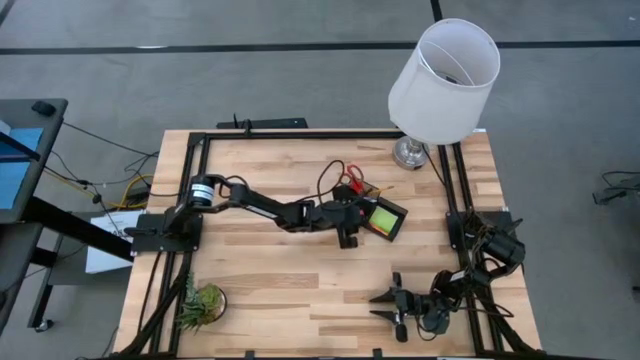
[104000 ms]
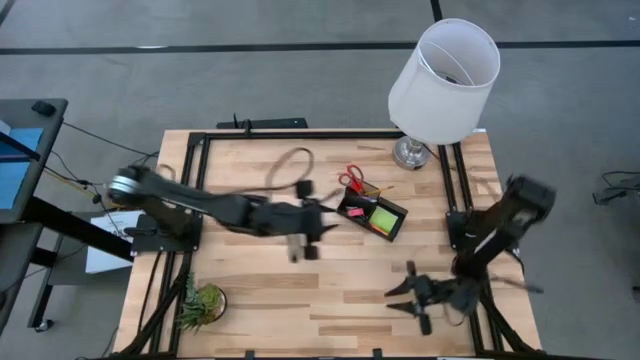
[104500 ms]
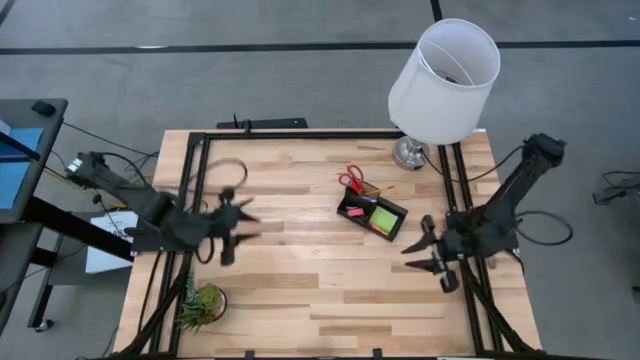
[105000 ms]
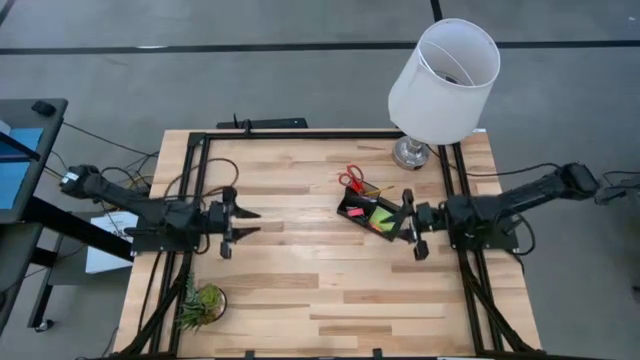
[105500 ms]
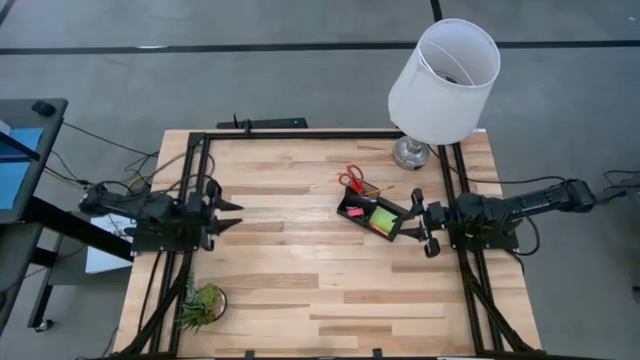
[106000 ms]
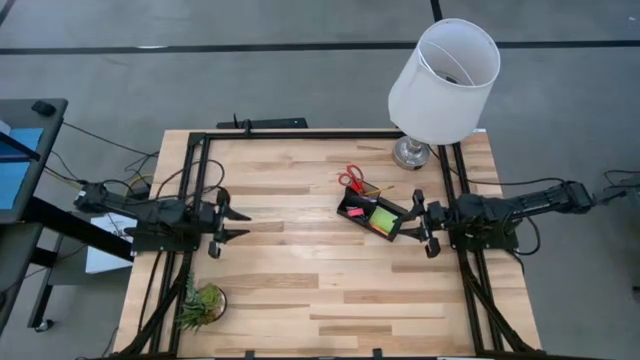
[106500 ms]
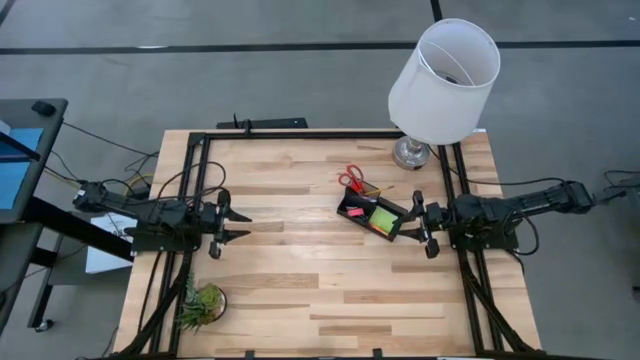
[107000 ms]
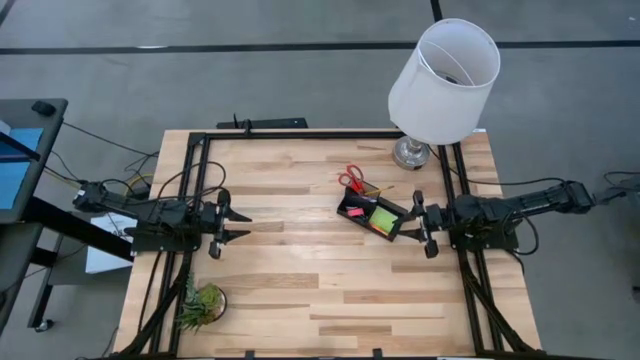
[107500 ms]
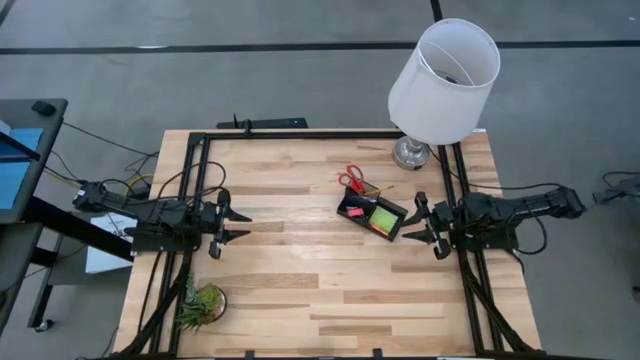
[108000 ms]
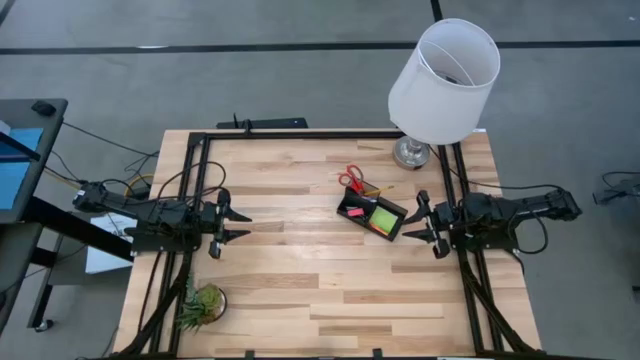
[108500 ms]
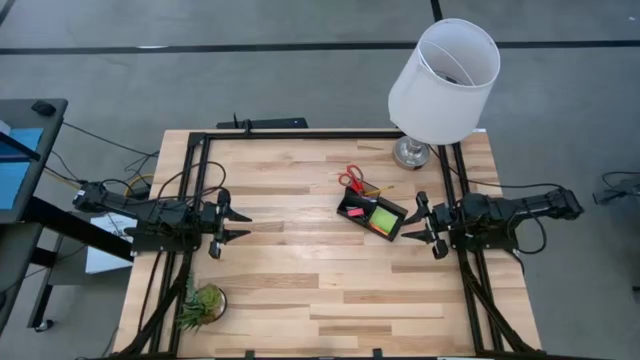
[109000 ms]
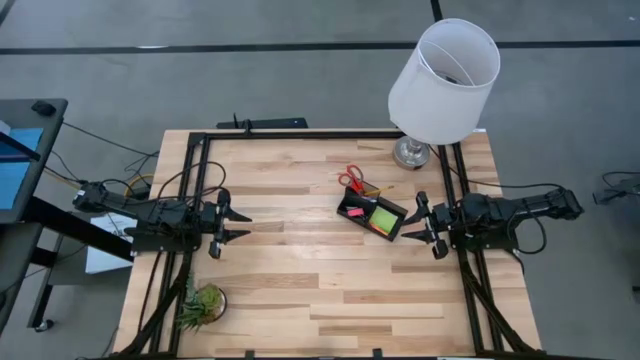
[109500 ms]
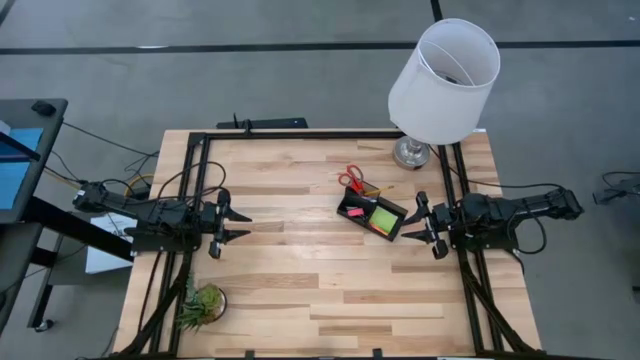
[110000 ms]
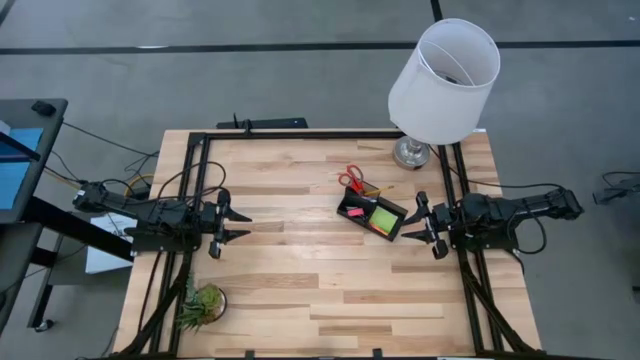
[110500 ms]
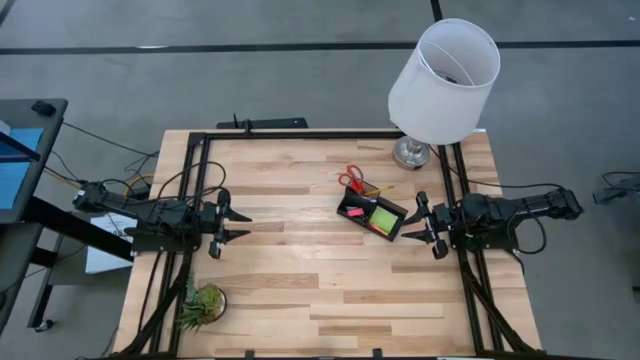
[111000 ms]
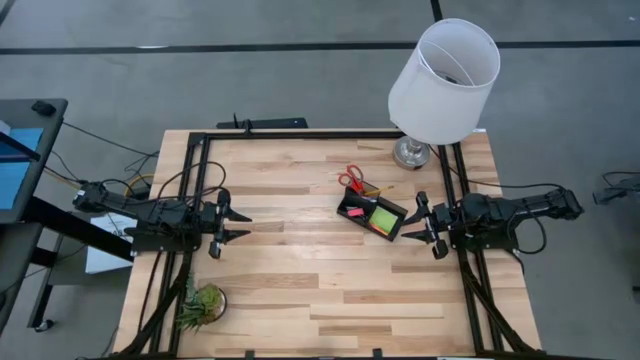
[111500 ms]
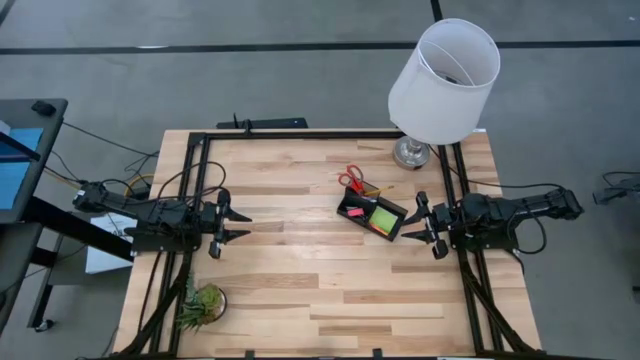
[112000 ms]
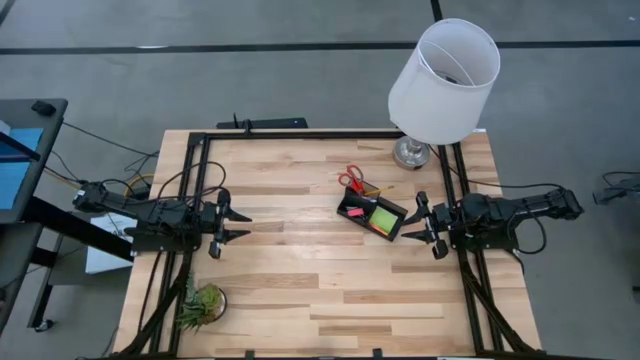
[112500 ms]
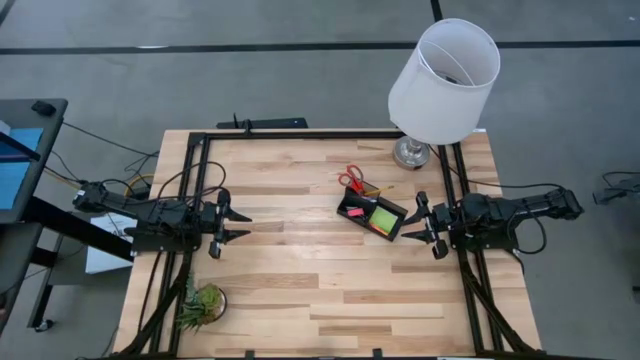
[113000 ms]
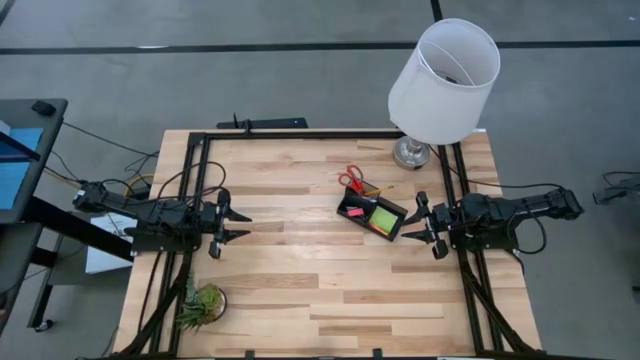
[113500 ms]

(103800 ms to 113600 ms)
Task: Pick and place office supplies into organizer
Return to Home Position

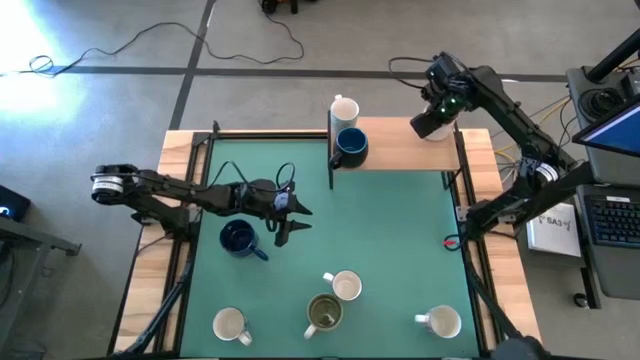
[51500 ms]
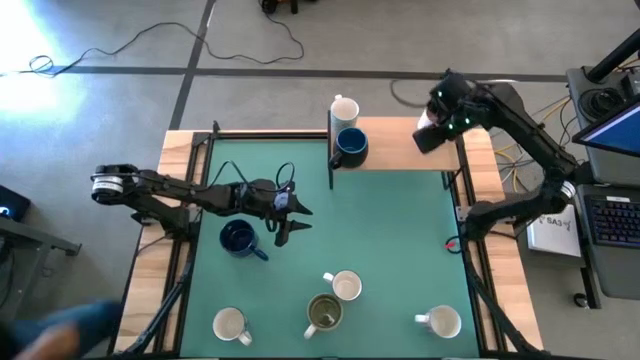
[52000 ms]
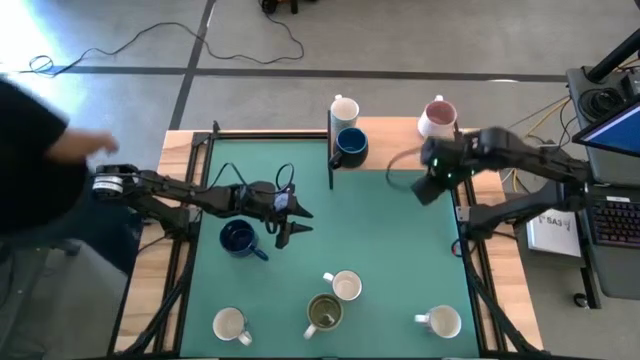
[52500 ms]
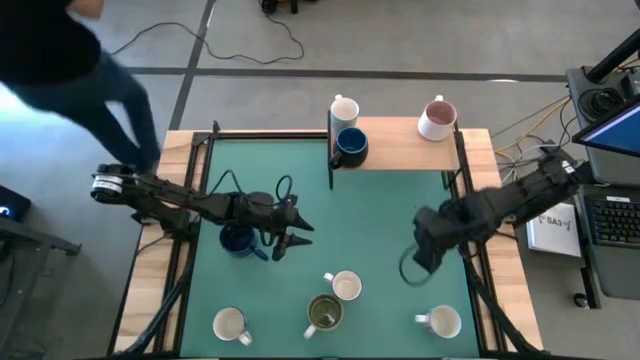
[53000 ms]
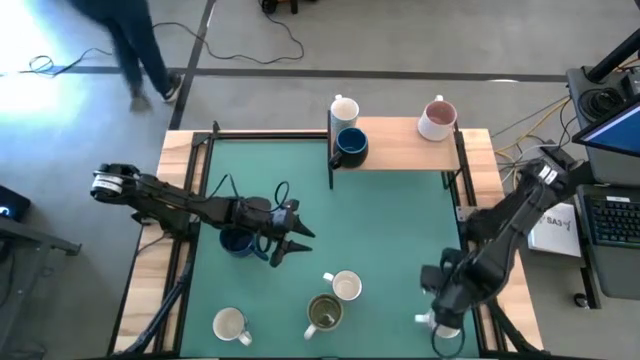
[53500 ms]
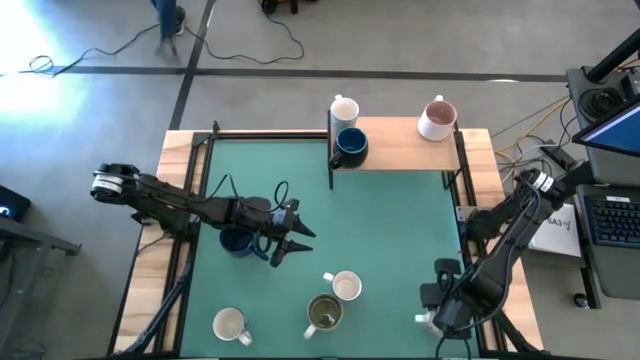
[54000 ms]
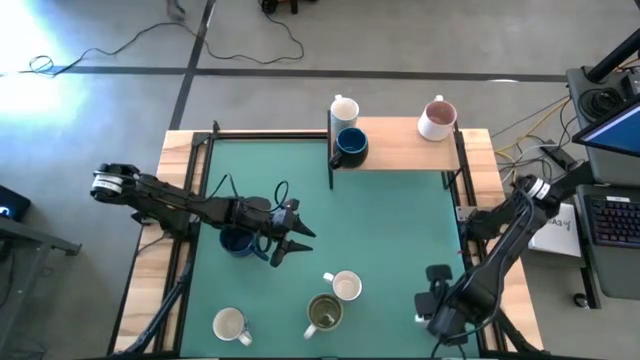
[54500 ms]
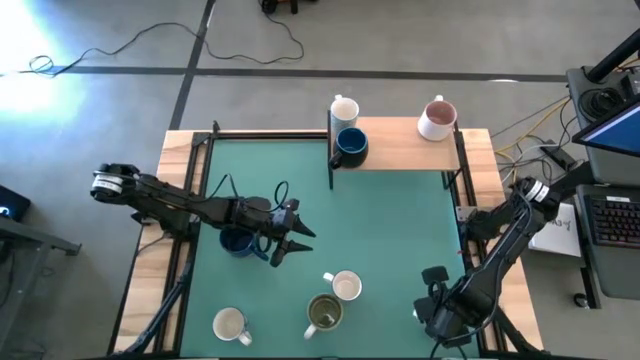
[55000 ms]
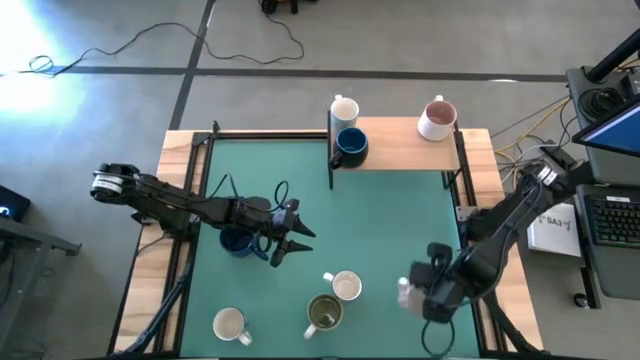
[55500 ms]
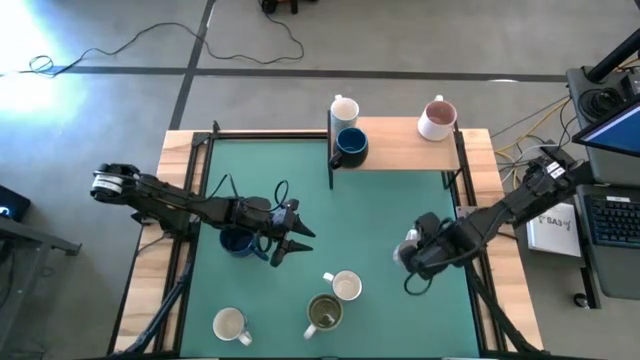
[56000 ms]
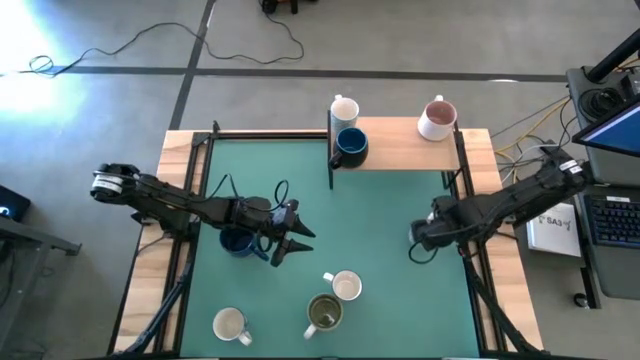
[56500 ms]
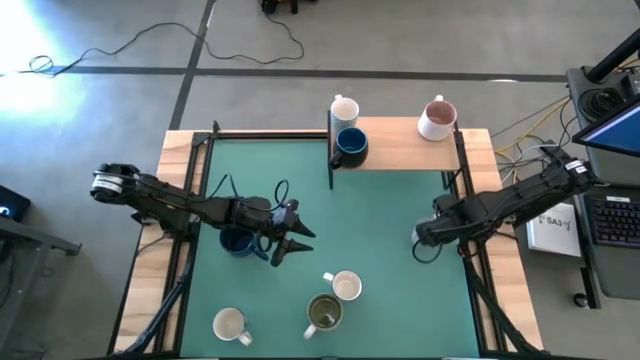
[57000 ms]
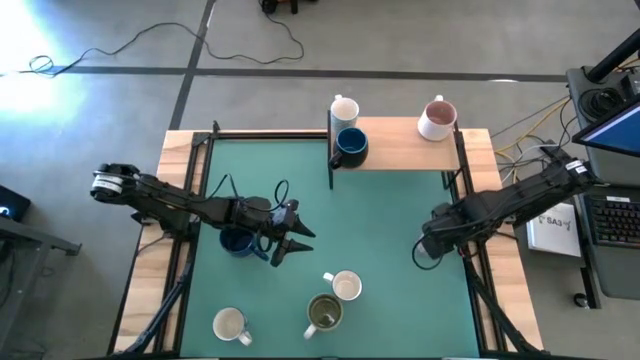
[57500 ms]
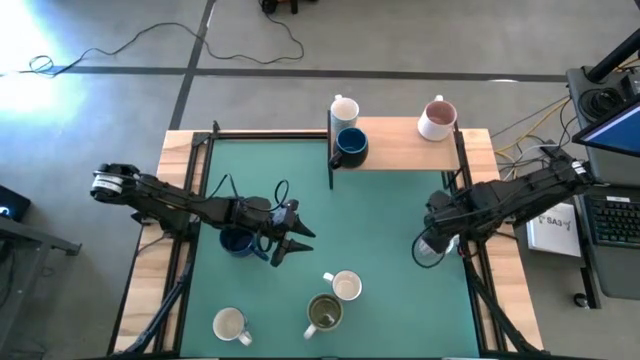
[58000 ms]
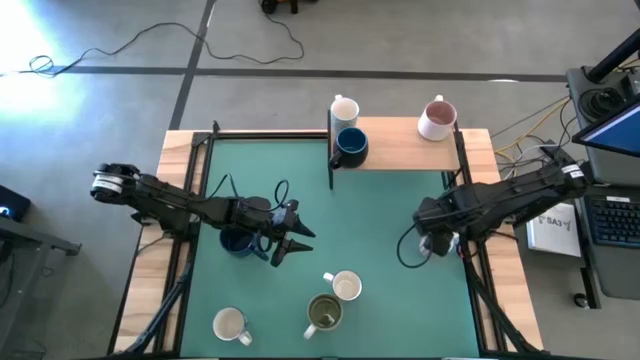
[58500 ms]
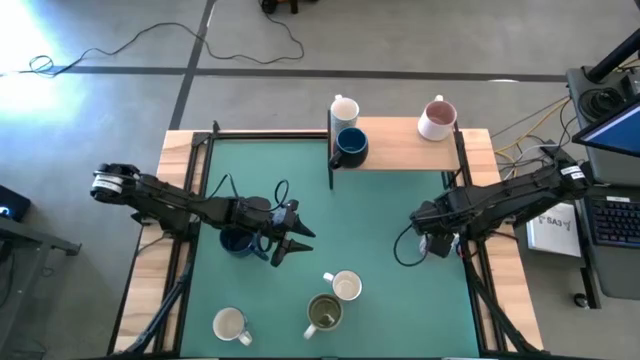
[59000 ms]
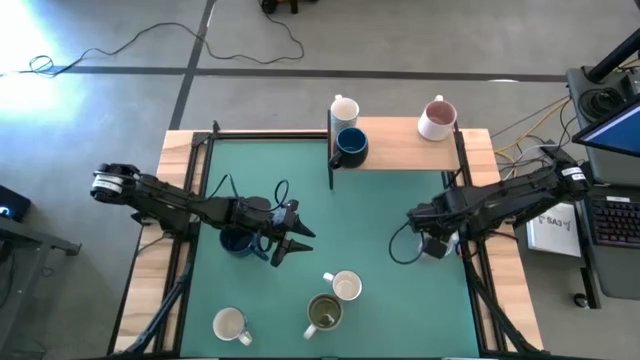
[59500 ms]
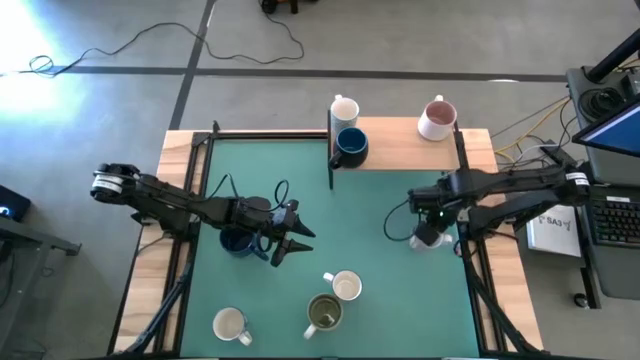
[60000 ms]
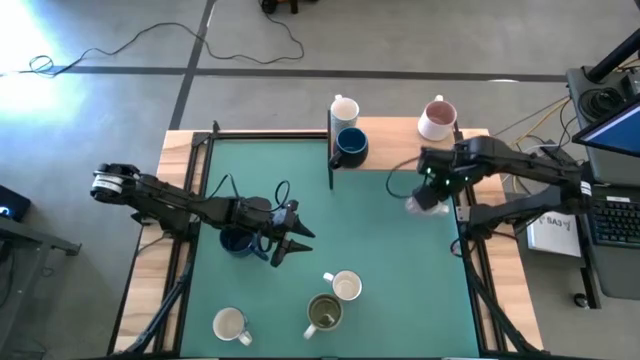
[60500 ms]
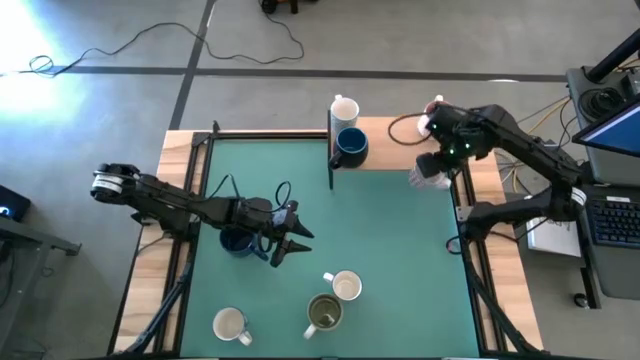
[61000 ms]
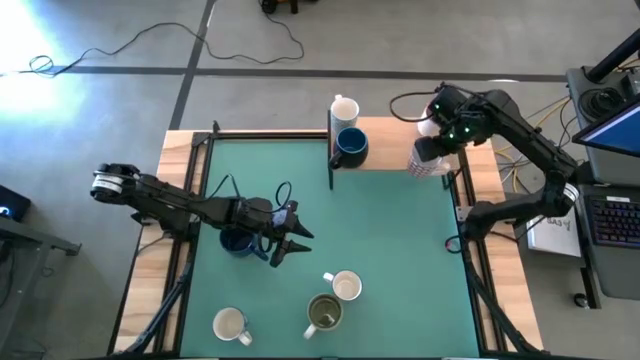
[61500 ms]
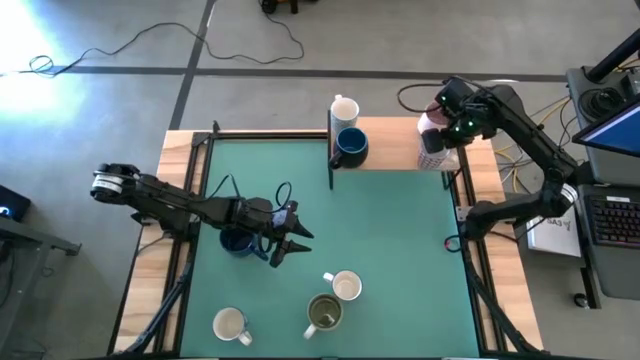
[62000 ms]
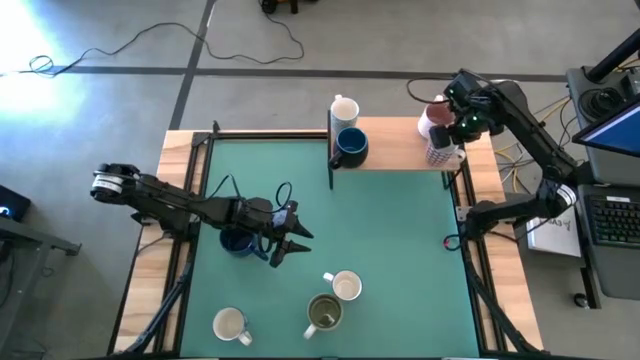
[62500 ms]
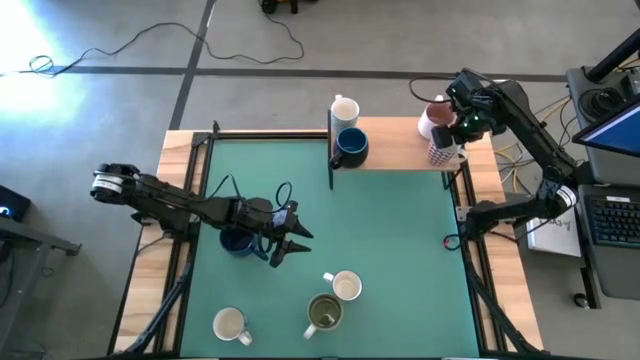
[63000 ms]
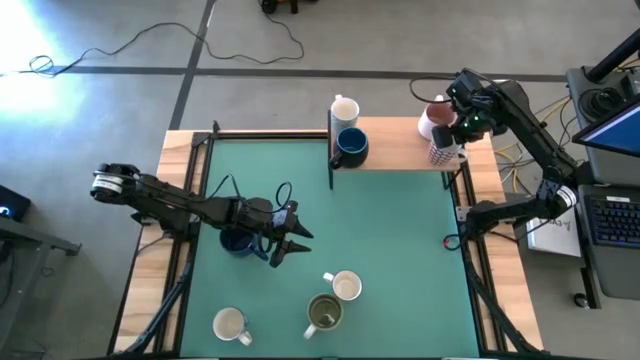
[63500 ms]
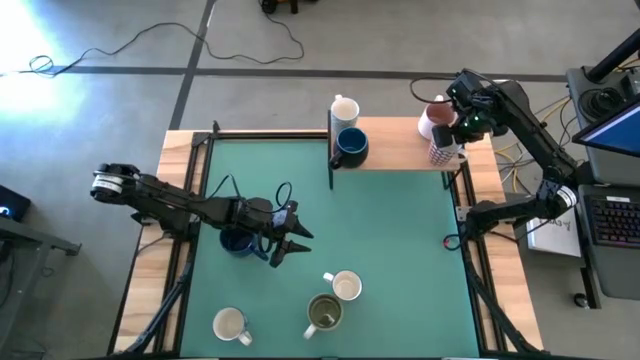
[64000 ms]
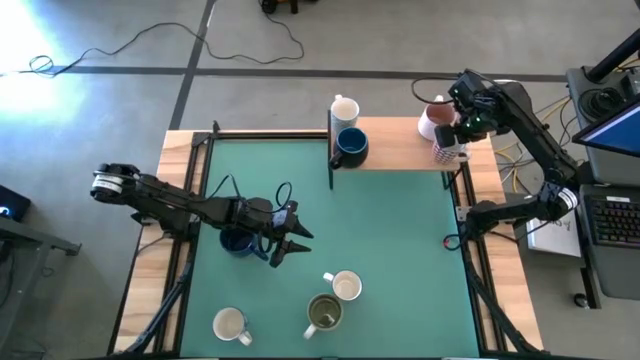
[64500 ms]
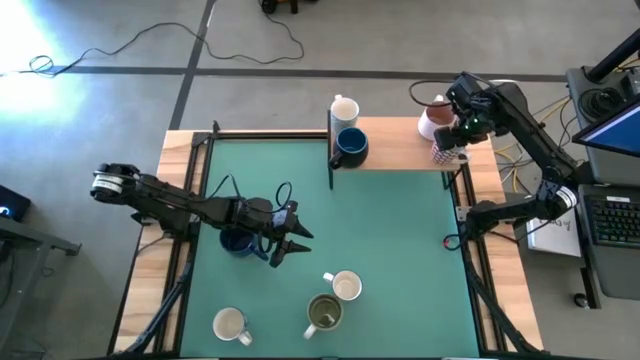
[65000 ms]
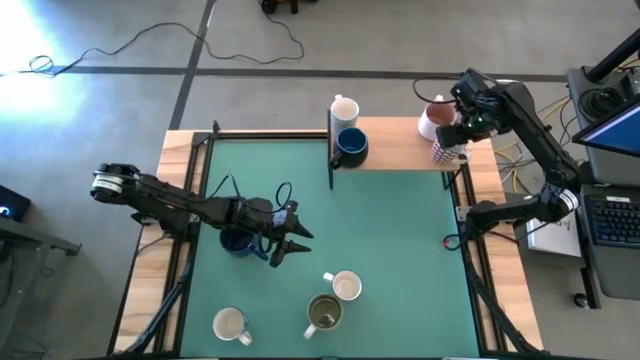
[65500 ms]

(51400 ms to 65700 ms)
Task: Place coffee mugs
Put the red patterned mug on the shelf
